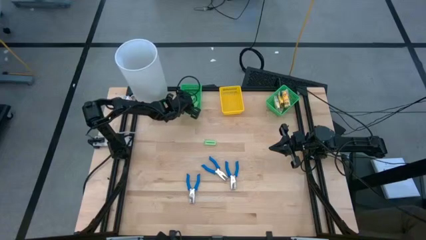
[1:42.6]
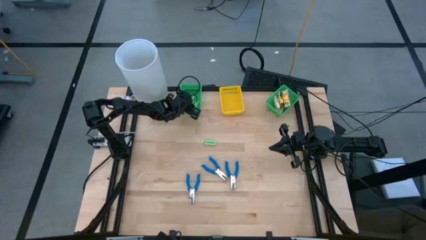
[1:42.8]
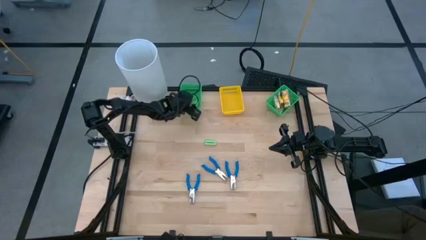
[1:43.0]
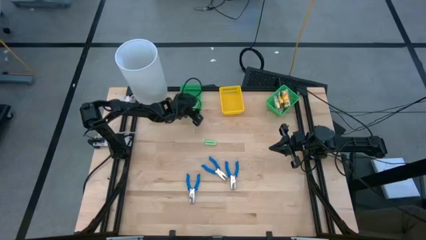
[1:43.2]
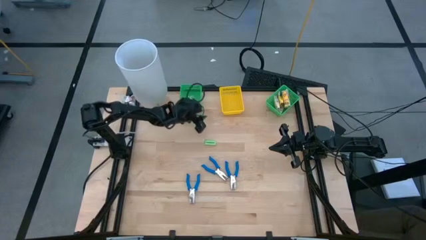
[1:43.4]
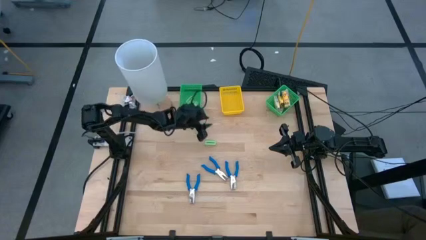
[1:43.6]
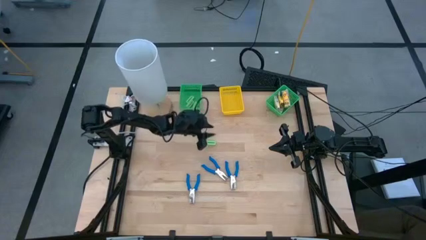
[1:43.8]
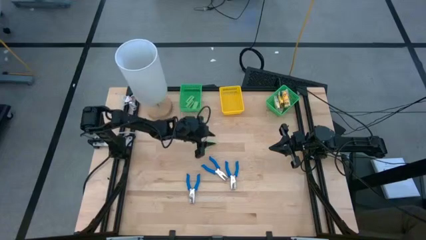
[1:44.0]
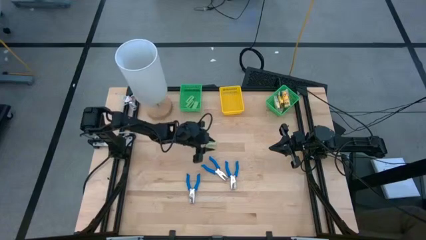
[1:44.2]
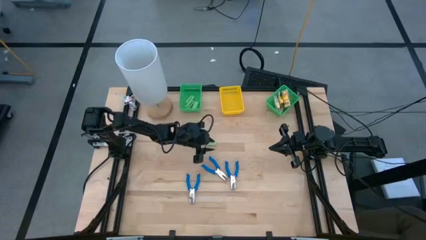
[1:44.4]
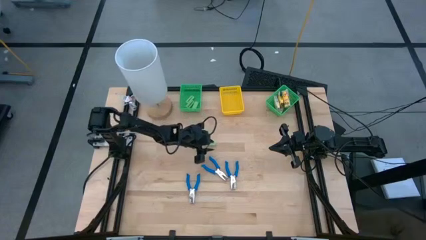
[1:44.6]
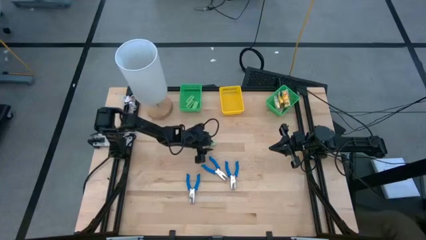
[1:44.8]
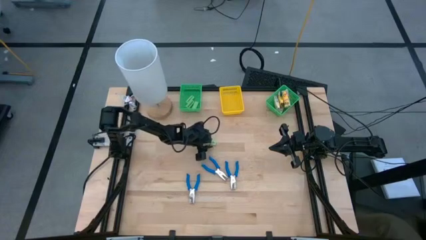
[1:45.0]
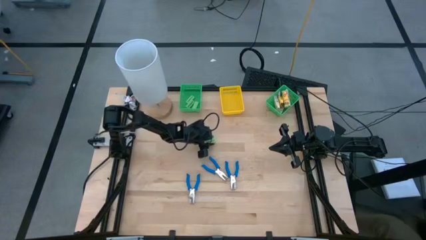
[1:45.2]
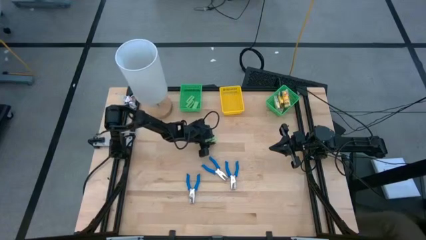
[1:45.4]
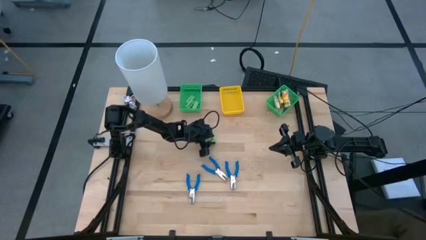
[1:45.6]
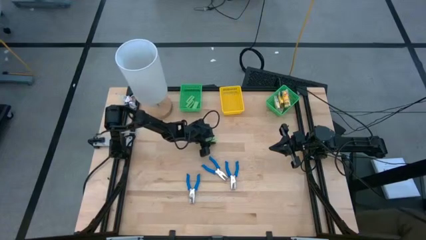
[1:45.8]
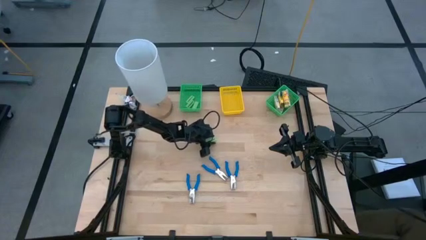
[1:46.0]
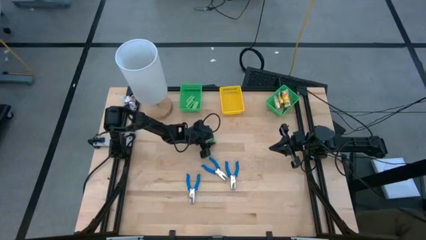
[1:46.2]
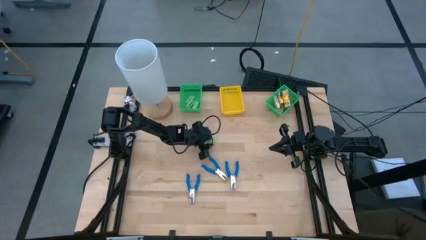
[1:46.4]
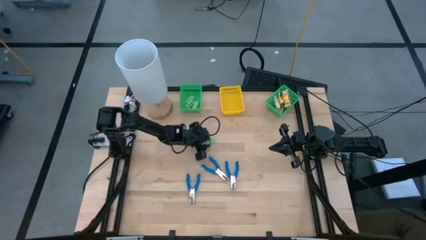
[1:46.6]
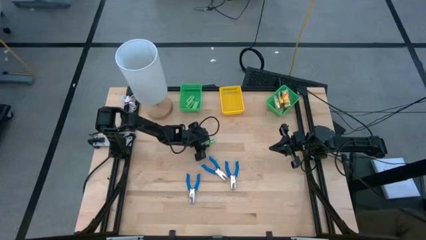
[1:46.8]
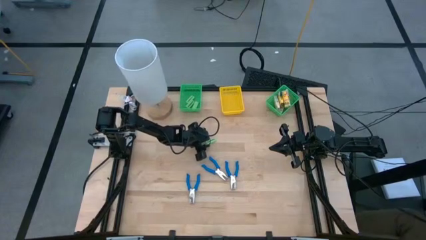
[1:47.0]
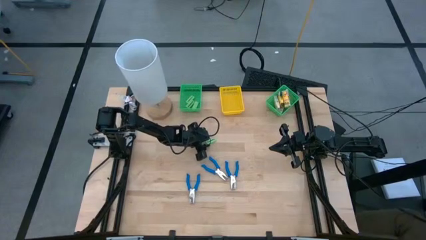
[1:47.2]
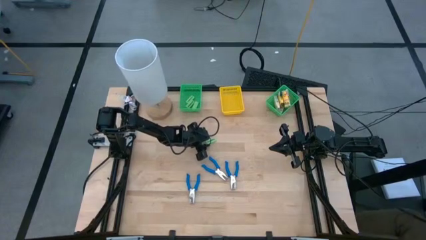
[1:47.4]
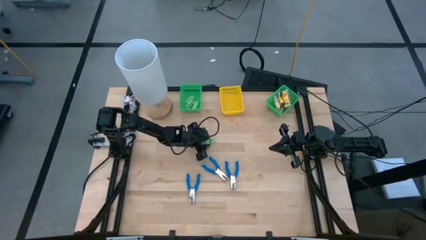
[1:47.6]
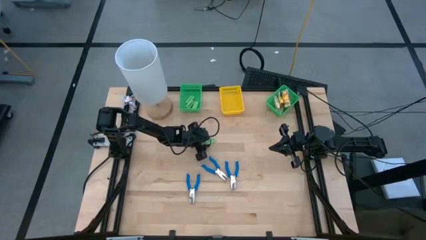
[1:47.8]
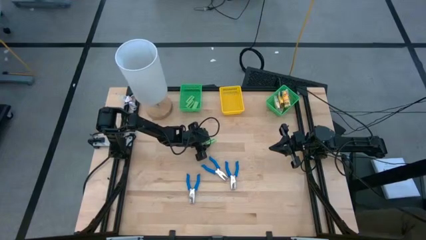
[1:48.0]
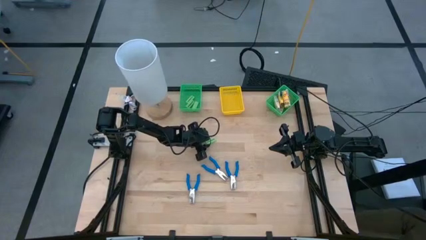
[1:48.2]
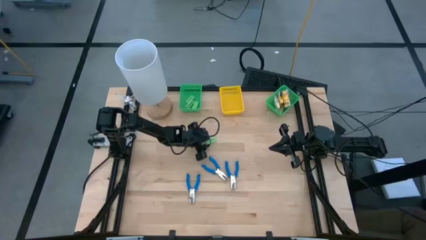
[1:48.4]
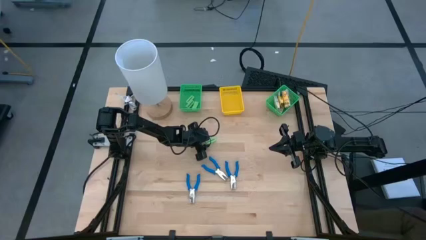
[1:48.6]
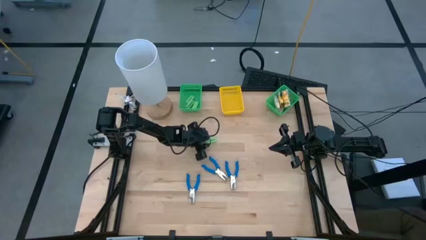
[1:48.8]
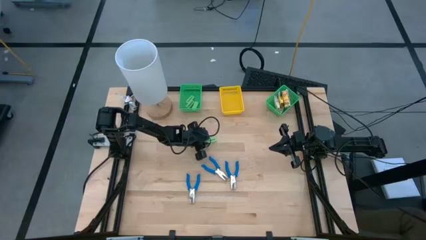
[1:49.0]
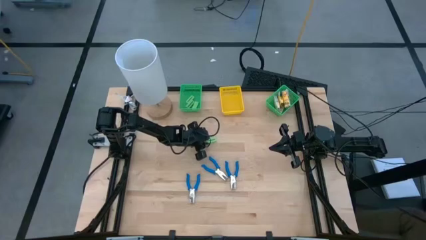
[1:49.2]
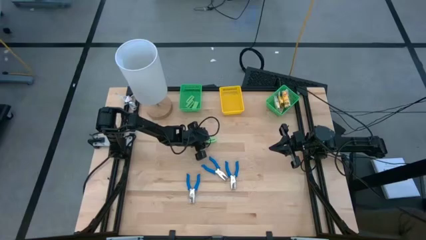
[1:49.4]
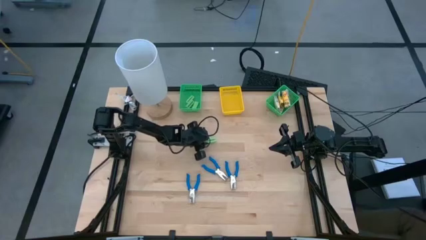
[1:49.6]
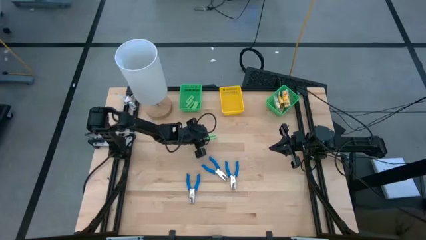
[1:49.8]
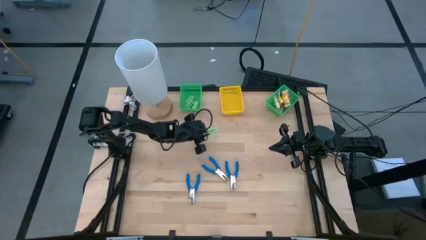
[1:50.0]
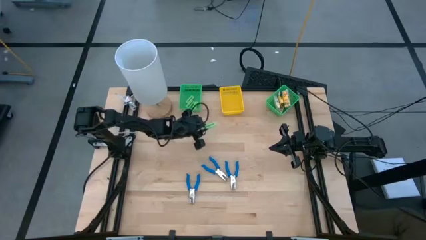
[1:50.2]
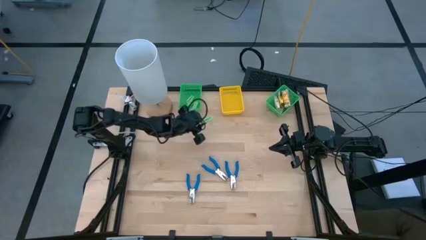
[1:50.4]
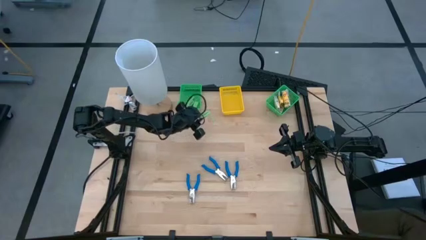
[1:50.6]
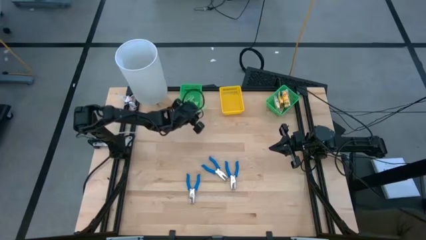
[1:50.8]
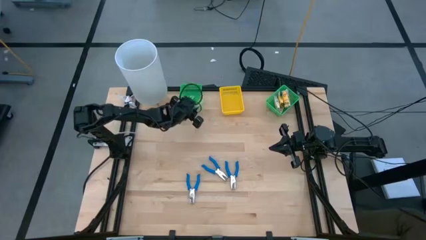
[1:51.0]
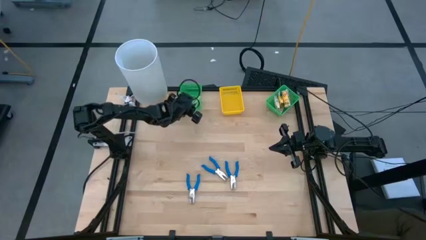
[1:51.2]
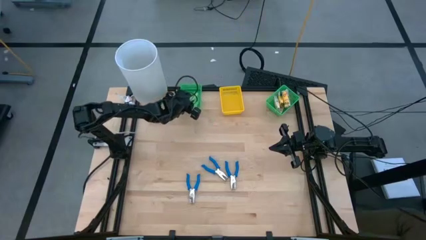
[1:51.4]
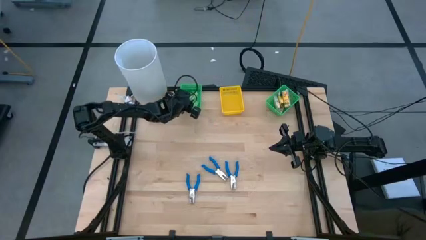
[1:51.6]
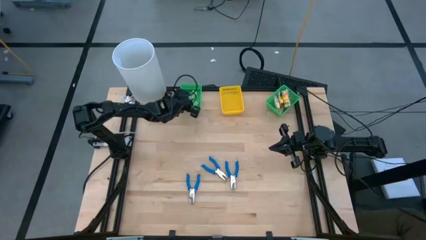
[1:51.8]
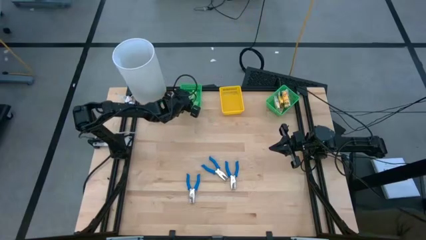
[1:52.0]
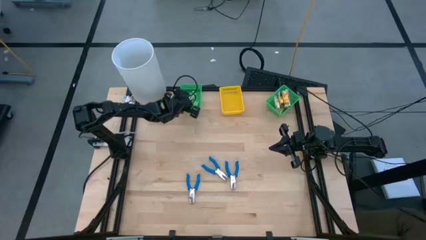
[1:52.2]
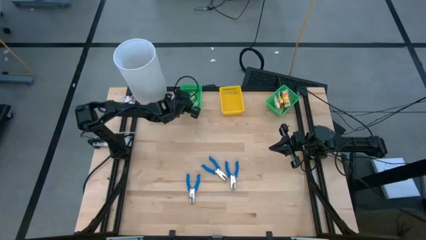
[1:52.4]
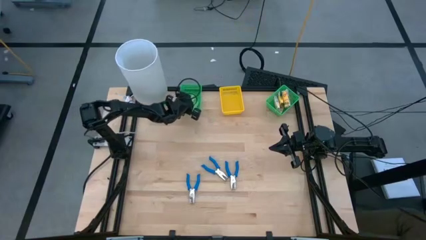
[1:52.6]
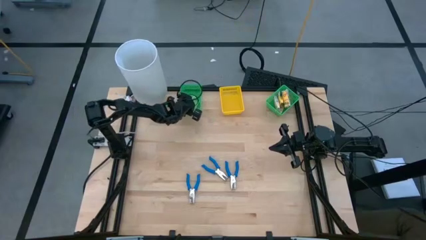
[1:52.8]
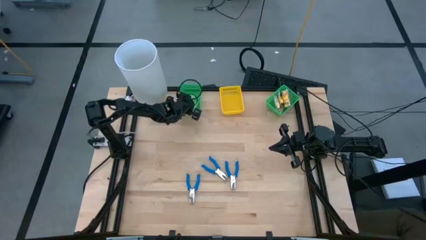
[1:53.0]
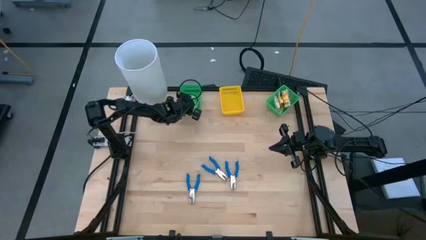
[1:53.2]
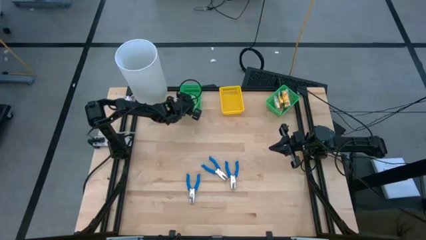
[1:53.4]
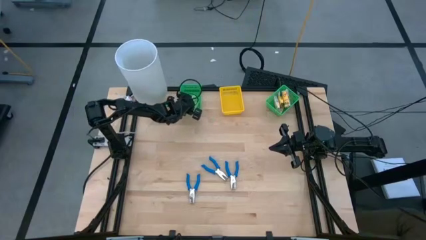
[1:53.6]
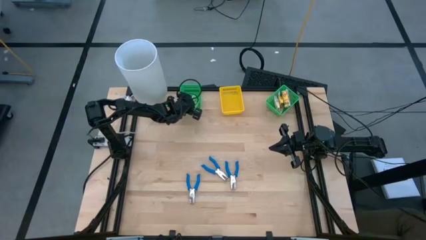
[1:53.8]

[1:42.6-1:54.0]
Task: Pick & Place School Supplies
Put the green eraser into the left green bin

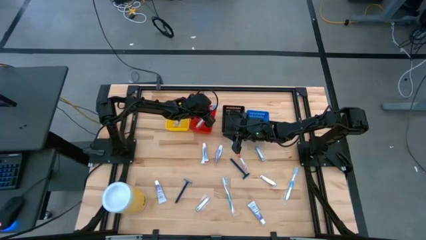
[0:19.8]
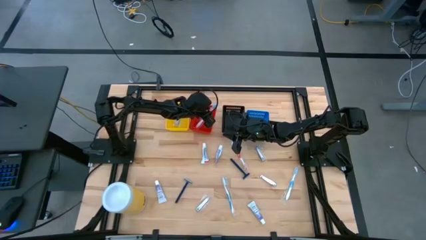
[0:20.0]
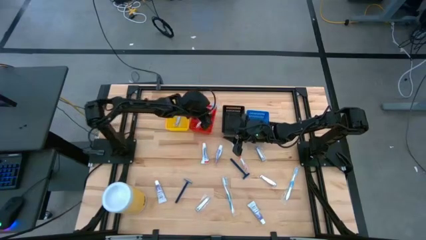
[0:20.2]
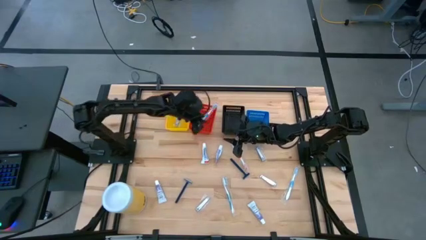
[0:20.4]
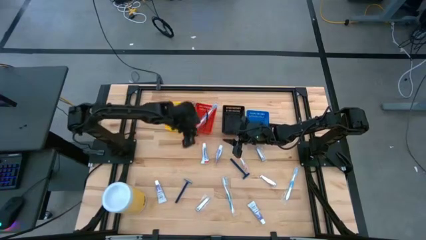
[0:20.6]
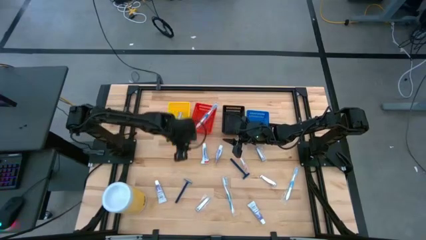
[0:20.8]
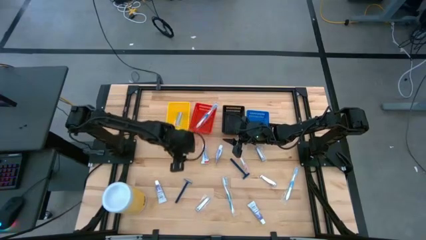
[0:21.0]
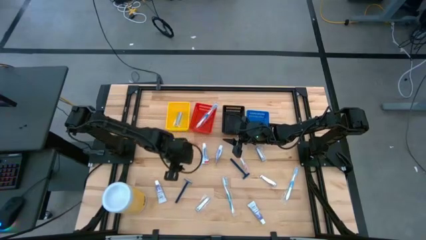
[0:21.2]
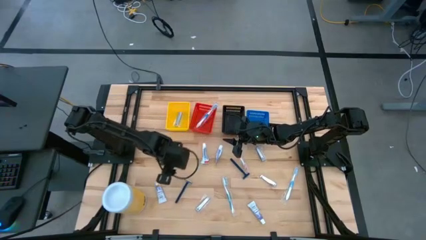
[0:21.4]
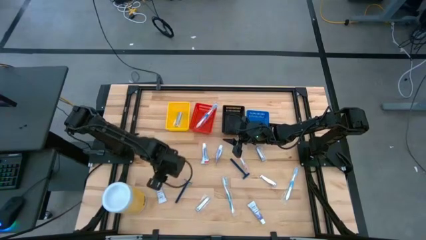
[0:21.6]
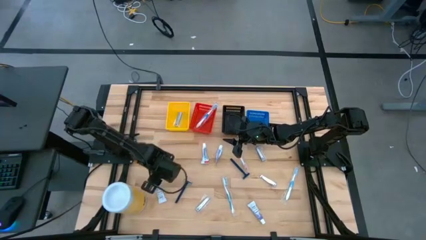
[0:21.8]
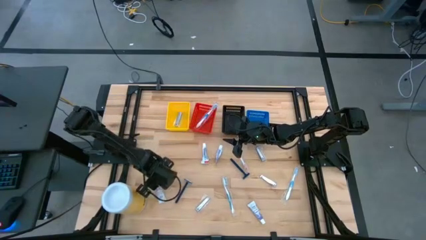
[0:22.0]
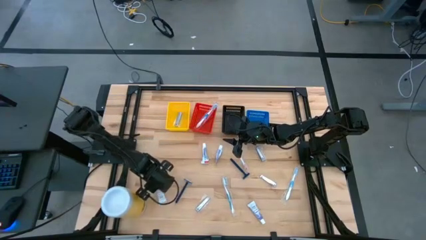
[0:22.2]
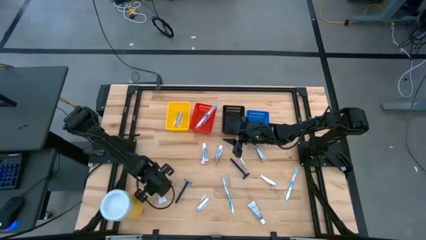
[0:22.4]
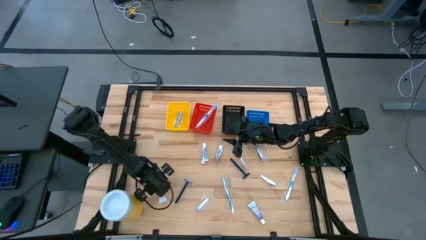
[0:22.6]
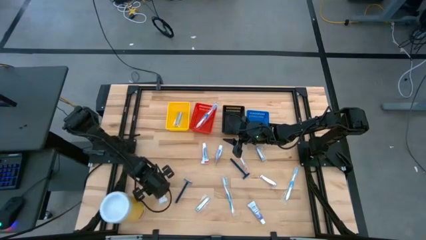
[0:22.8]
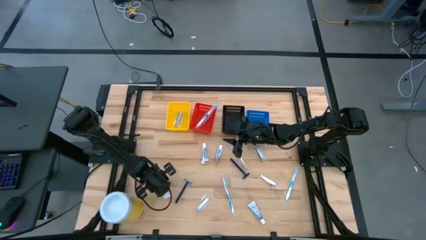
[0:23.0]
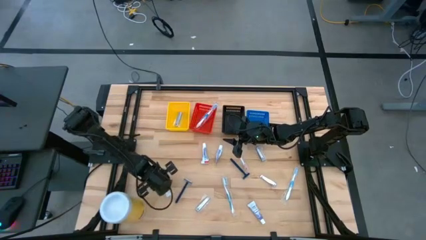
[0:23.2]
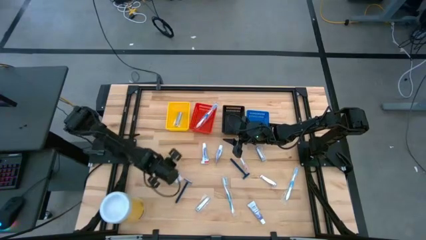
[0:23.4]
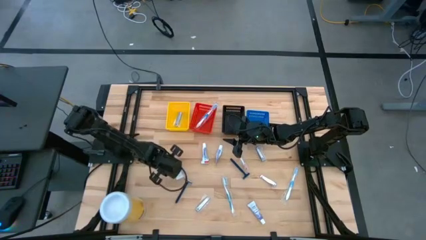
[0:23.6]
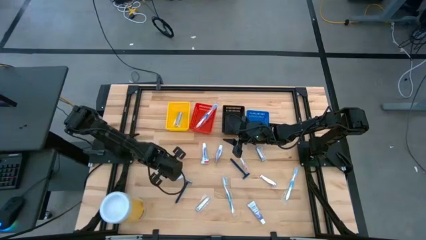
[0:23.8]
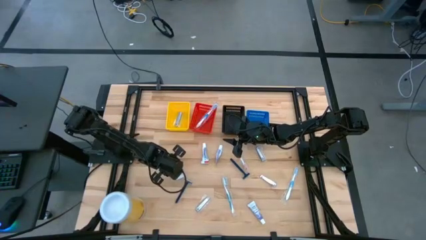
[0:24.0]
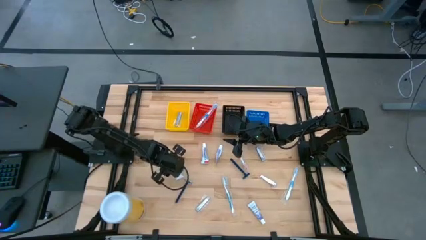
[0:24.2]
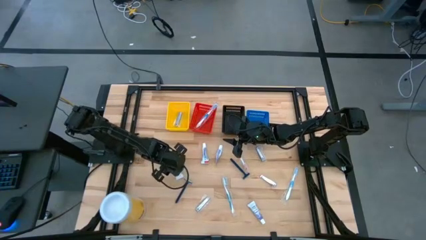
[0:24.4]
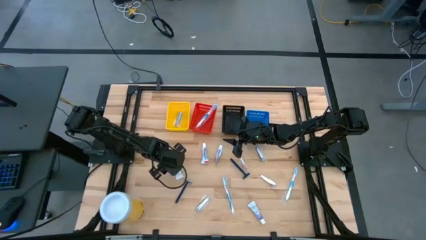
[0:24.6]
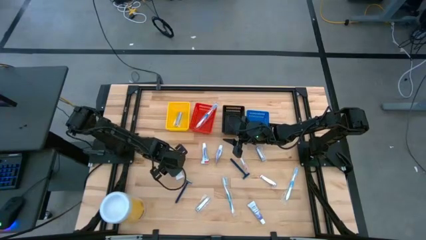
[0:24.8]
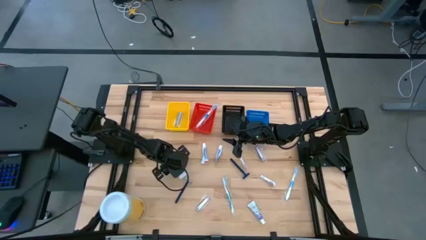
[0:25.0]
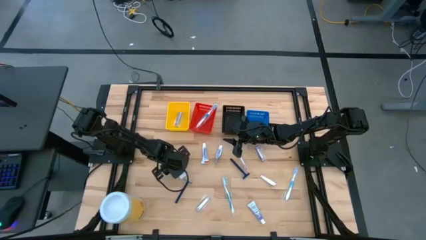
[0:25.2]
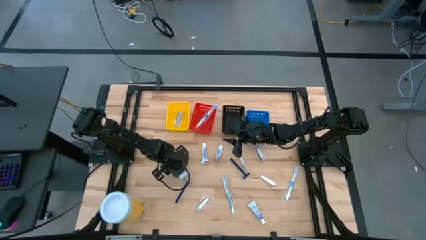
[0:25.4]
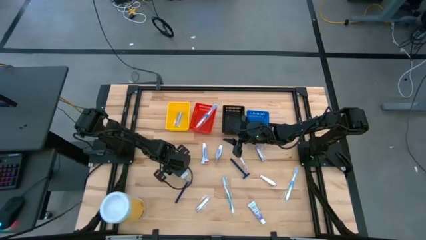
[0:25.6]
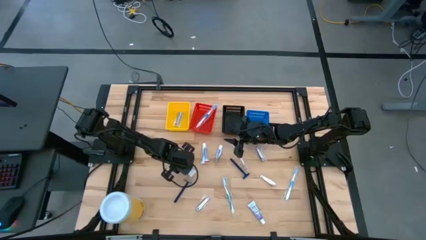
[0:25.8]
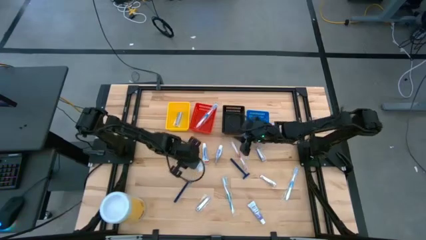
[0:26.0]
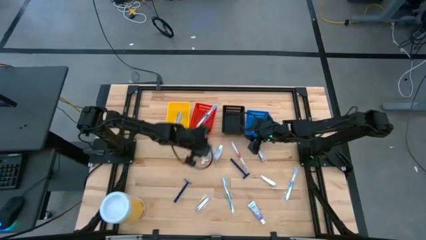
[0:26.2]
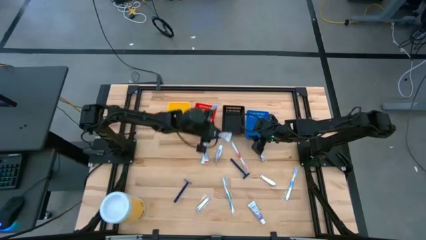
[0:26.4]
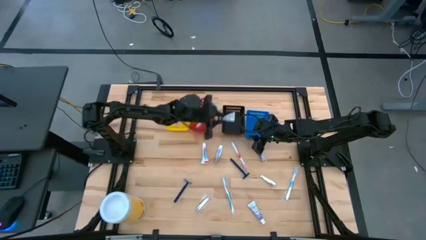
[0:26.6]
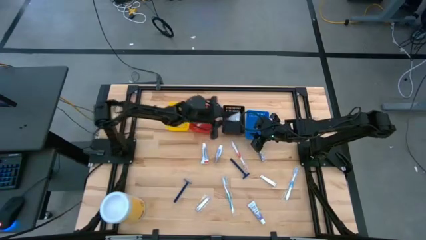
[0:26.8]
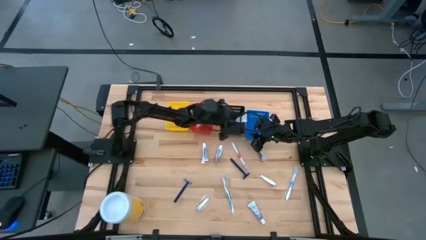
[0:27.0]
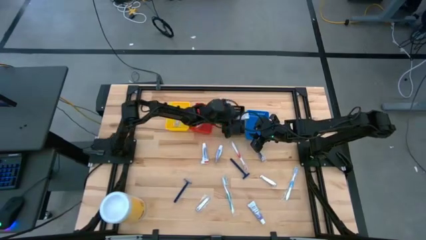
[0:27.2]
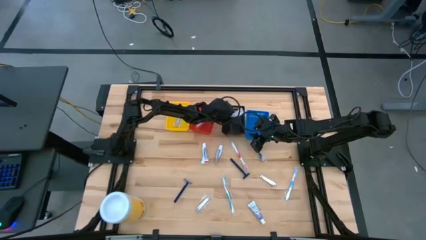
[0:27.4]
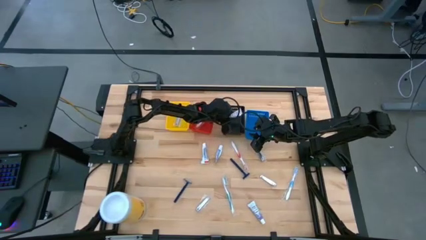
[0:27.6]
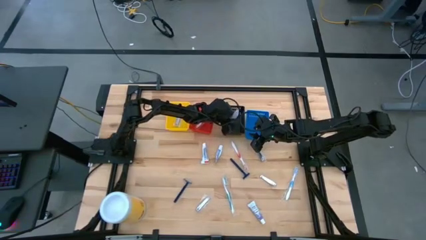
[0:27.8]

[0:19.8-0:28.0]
Task: Pick & Place Travel size toiletries
Put the white toothpaste into the black bin
